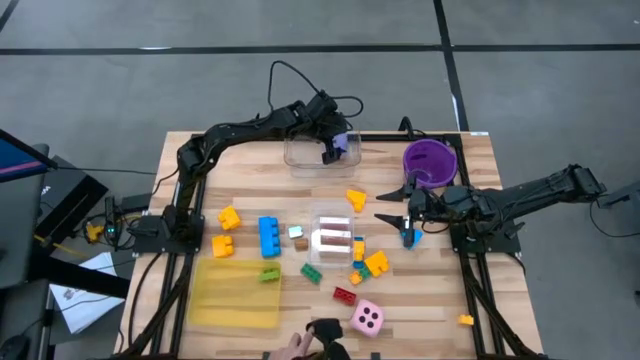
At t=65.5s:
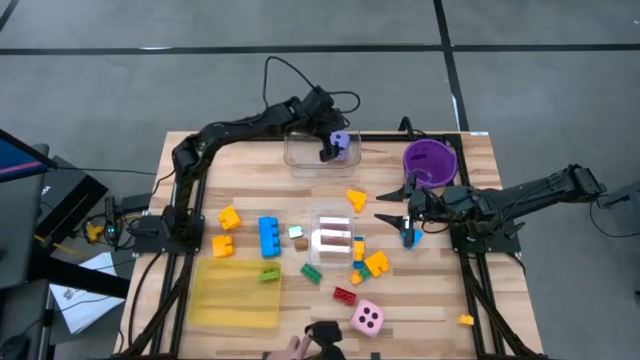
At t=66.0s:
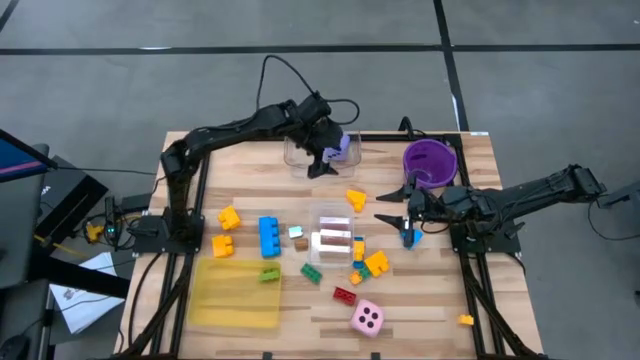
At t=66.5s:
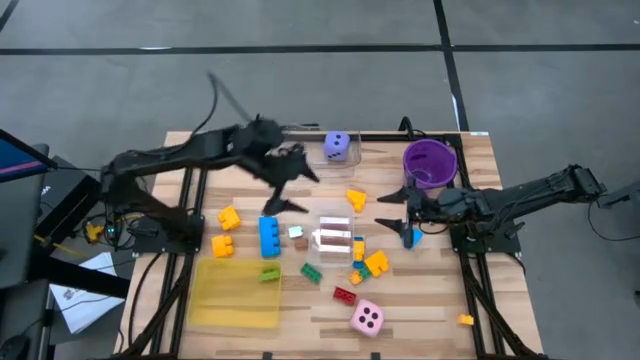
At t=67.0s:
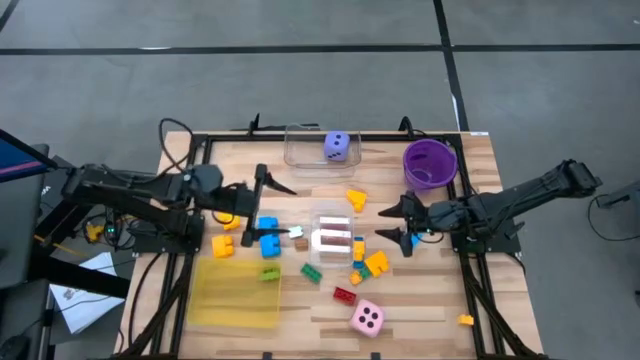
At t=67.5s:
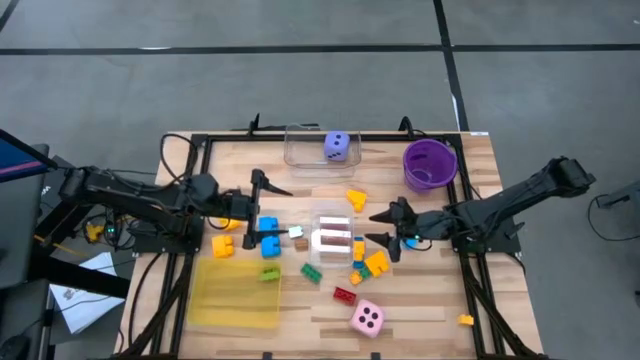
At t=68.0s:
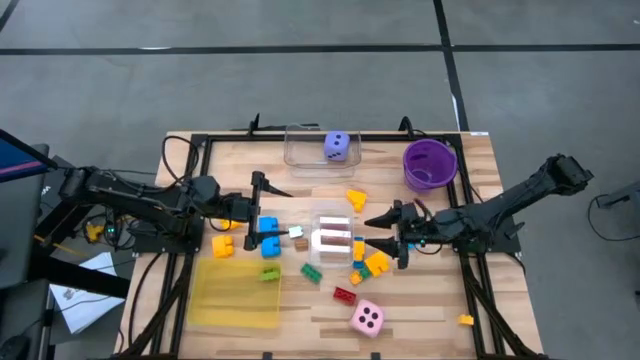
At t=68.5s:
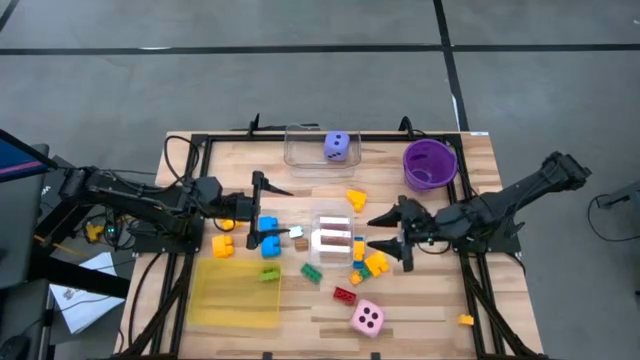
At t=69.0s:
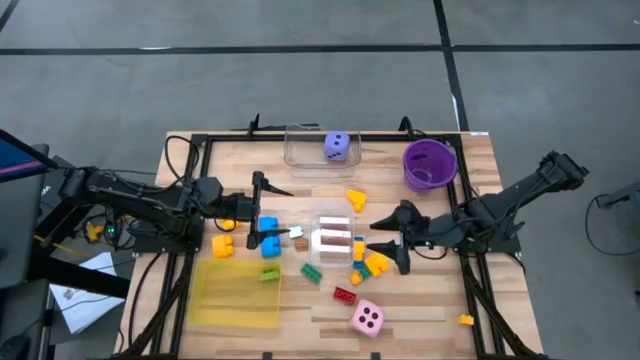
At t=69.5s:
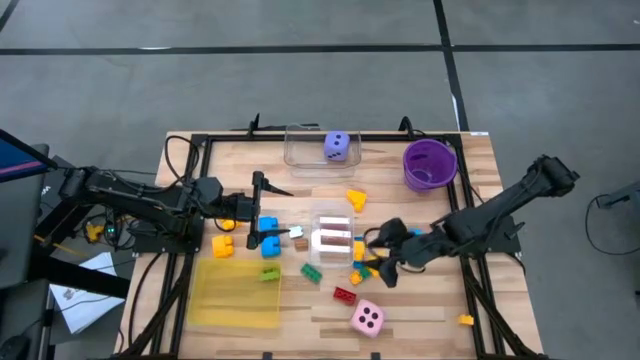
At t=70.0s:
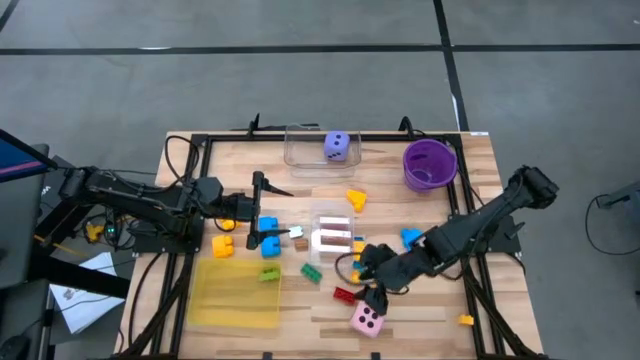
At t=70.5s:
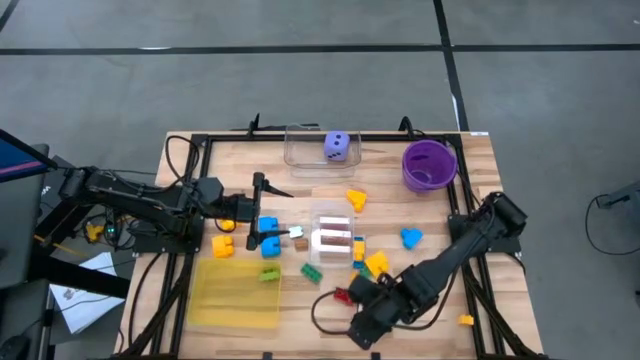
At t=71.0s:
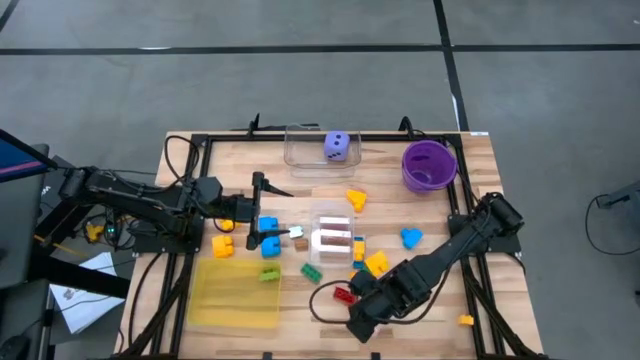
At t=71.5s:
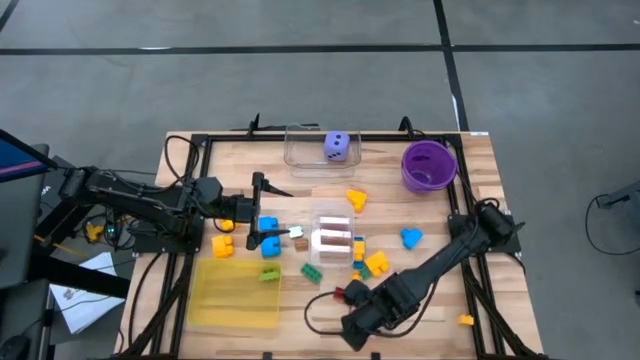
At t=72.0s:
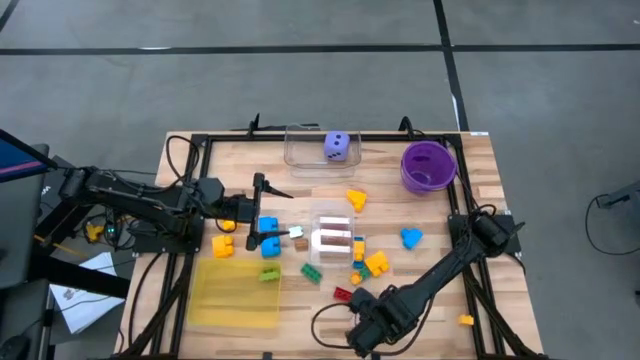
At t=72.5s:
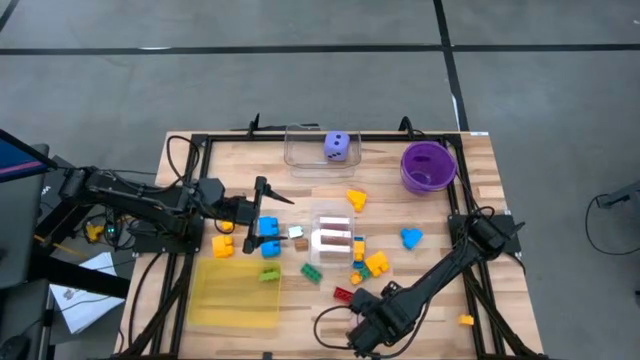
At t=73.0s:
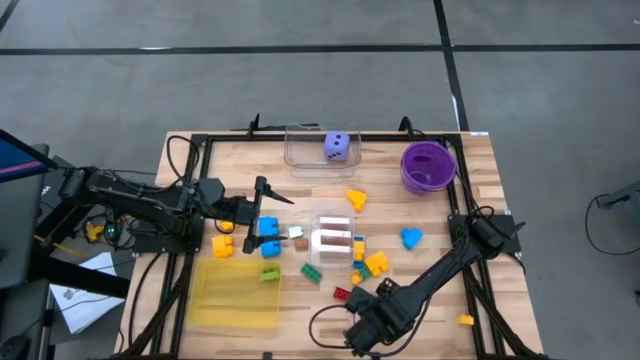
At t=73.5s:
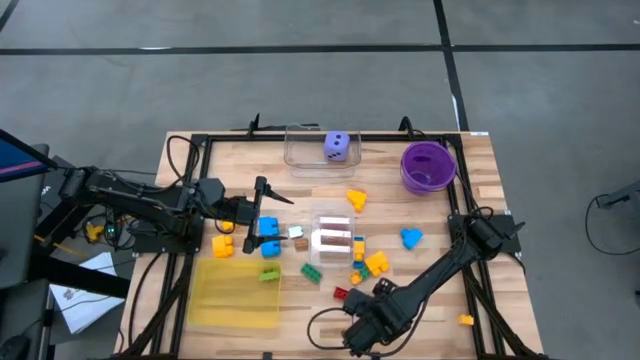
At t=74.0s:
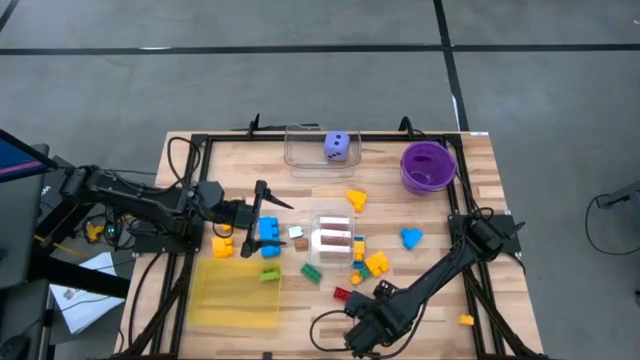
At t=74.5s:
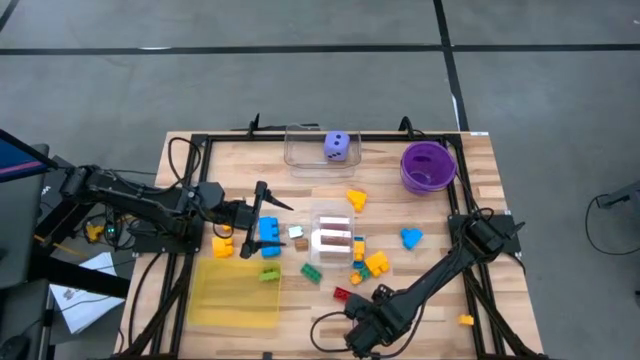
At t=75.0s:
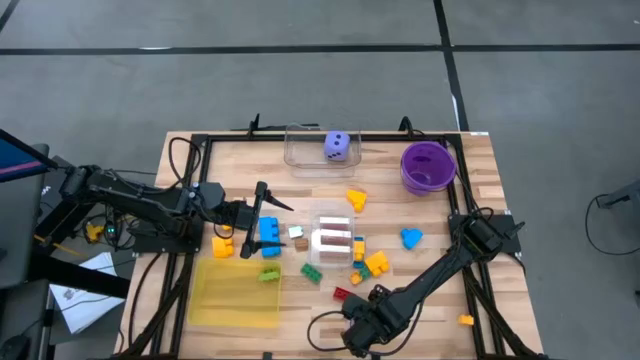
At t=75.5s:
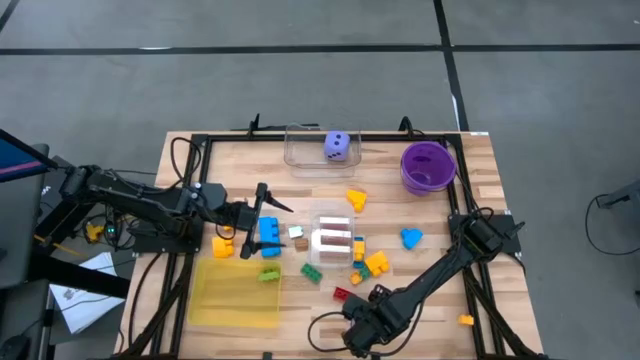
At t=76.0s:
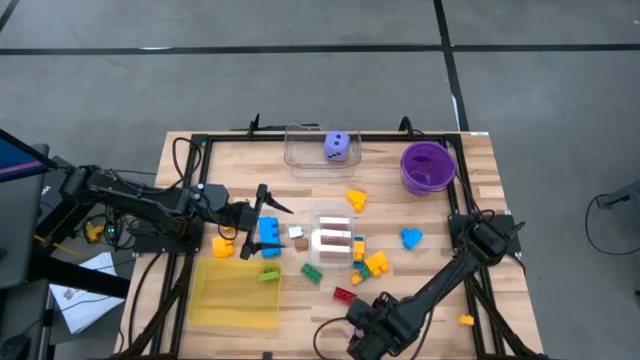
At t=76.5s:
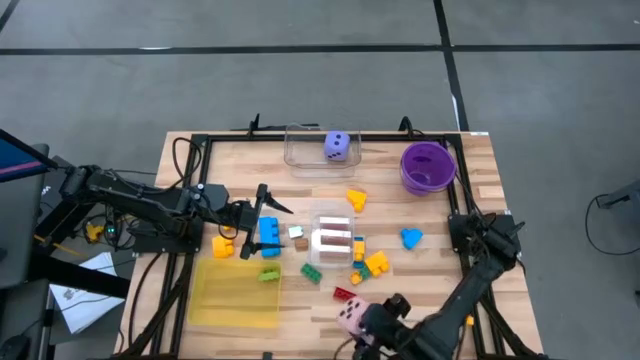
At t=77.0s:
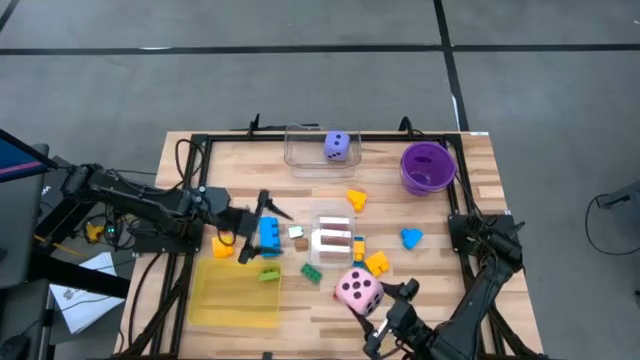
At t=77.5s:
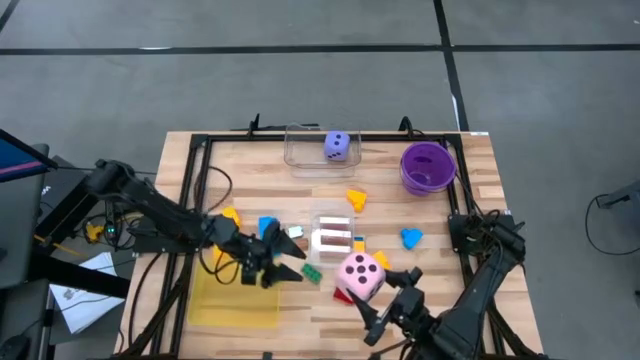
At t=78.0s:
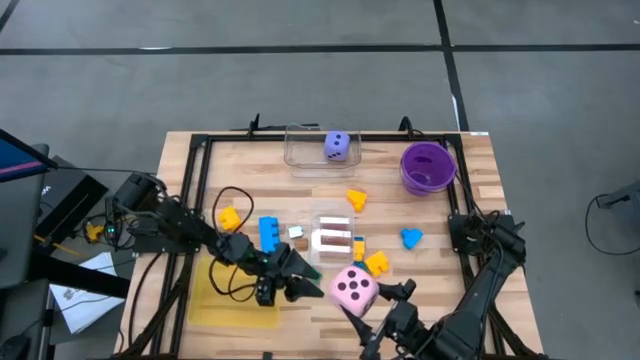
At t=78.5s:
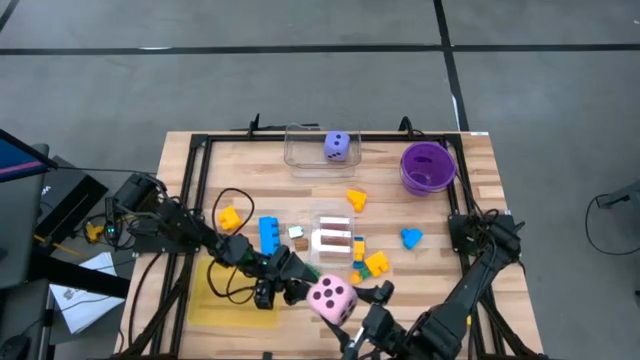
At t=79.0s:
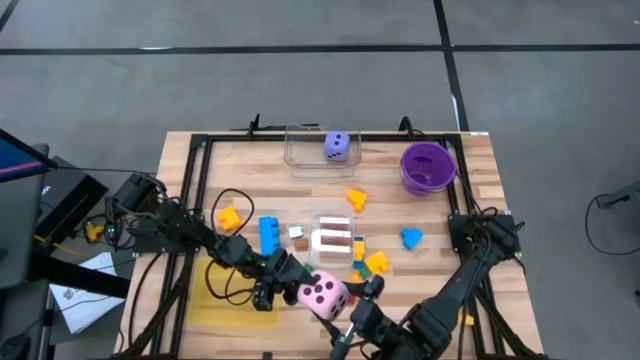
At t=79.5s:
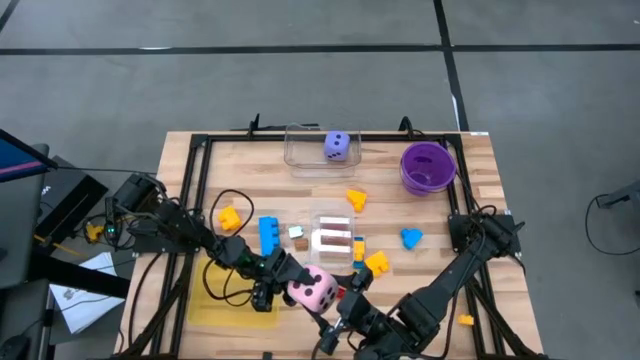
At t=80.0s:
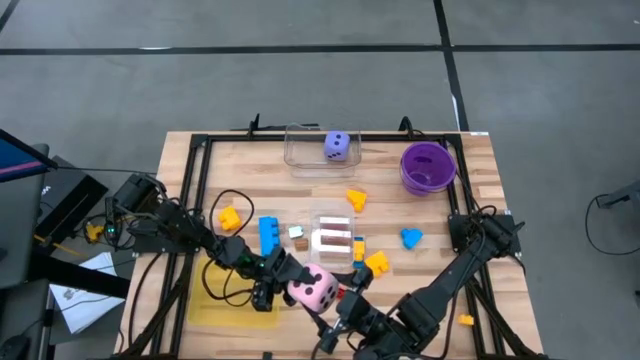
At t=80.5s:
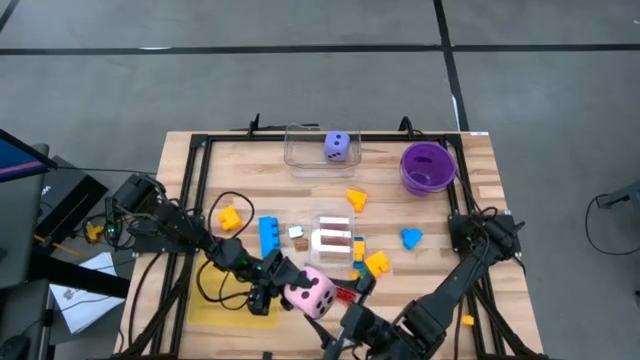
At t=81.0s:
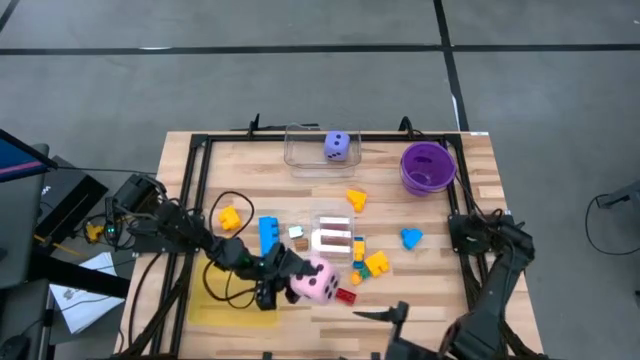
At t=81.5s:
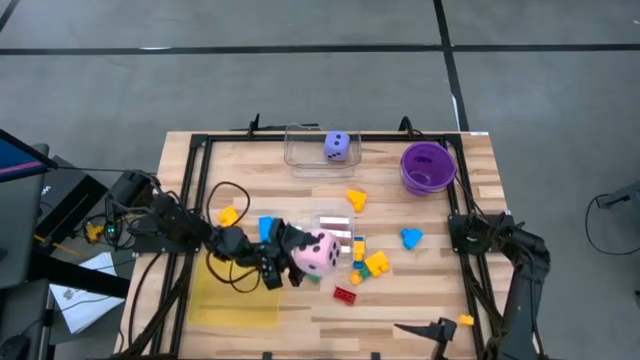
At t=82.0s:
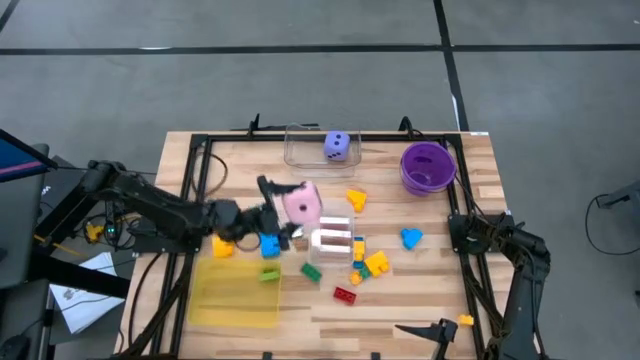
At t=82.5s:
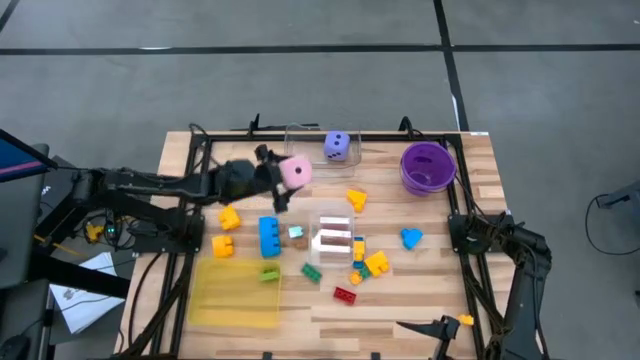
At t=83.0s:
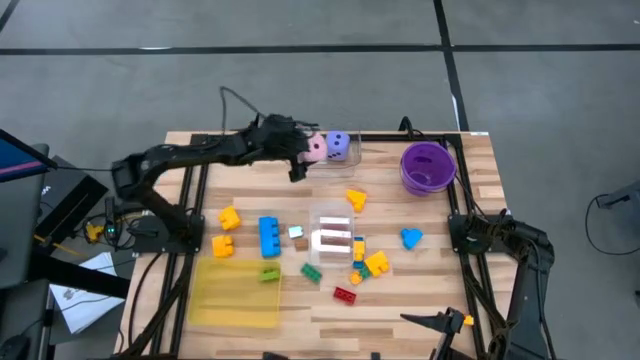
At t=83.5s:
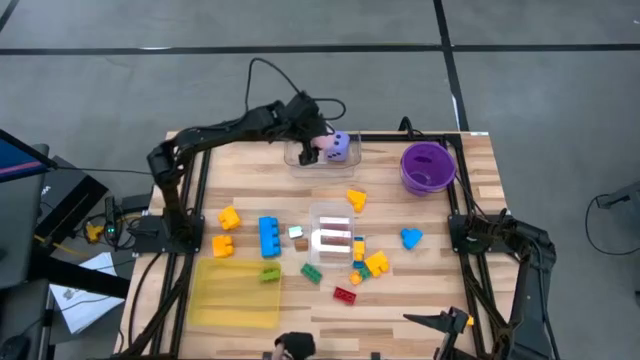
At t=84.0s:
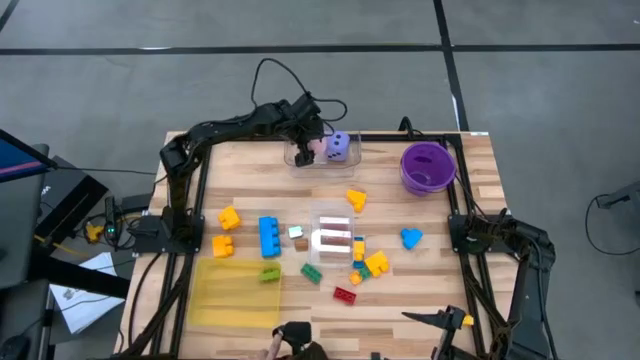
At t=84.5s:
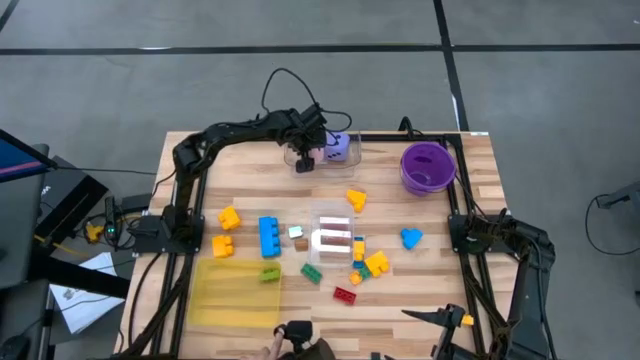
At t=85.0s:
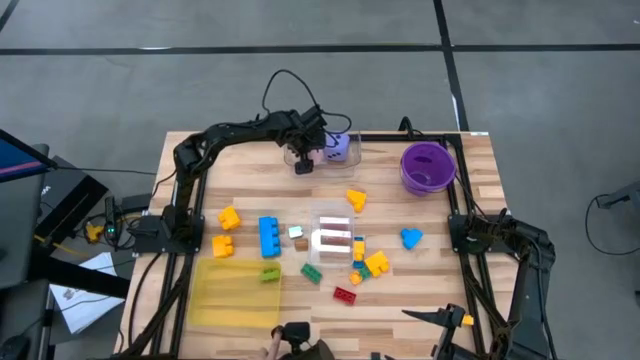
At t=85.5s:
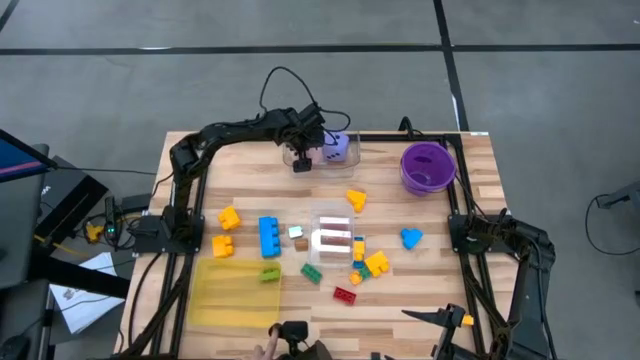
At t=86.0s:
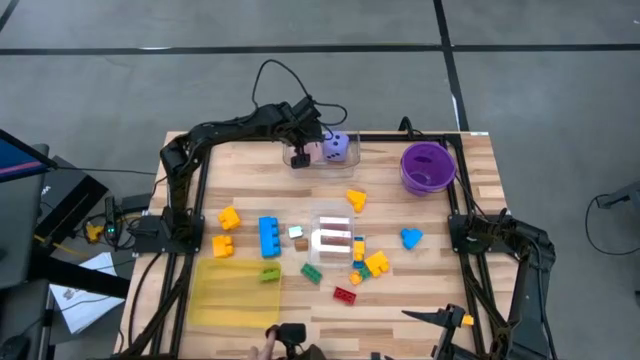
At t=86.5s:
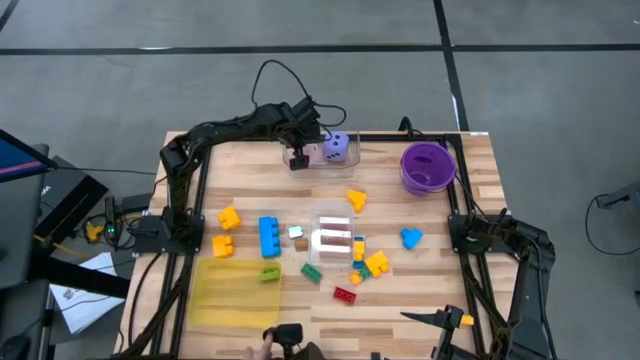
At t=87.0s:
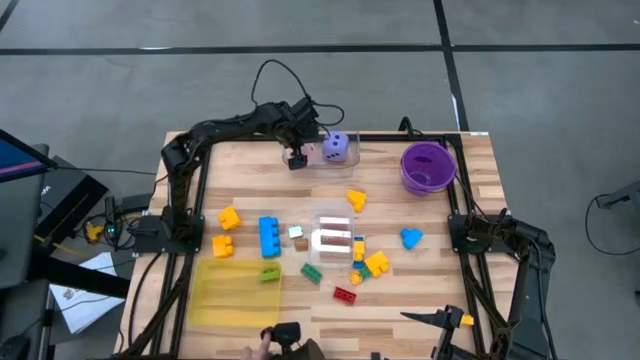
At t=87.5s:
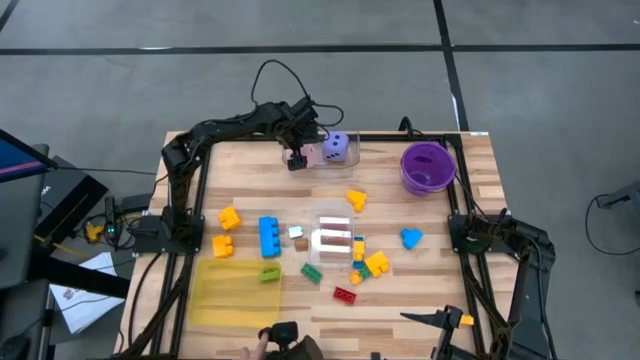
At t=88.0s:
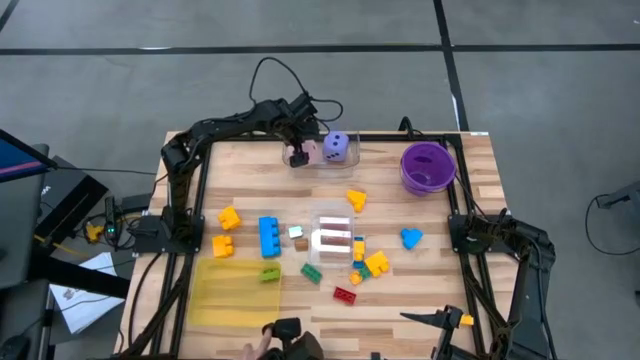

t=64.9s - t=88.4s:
Task: Pick & Place Toys
Put the pink die into the top transparent bin
